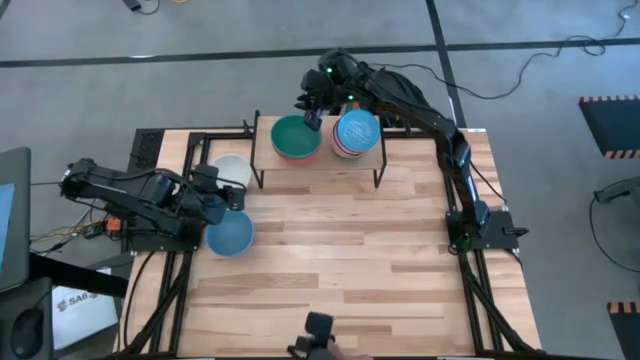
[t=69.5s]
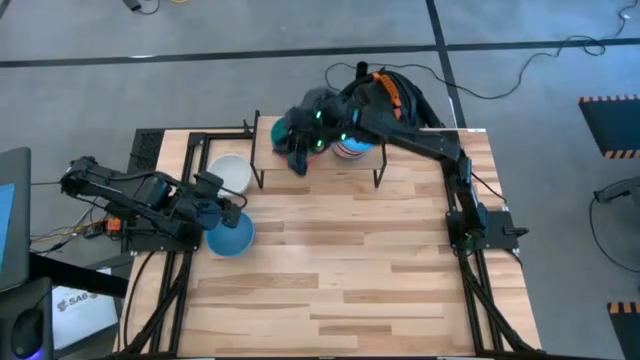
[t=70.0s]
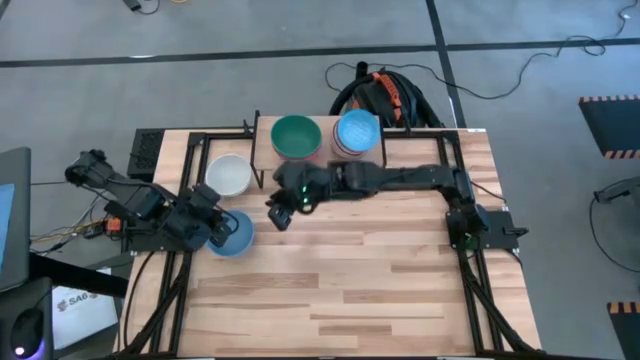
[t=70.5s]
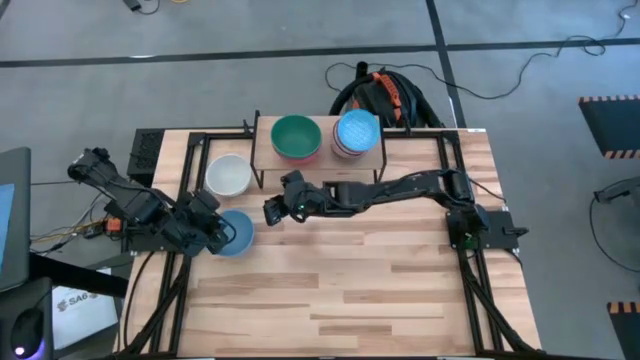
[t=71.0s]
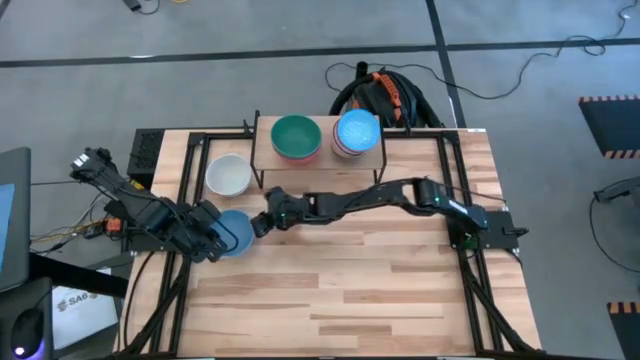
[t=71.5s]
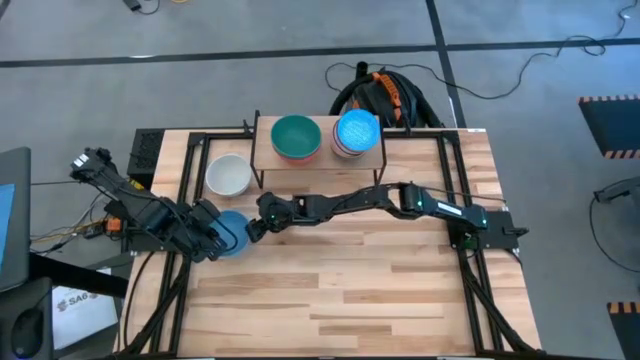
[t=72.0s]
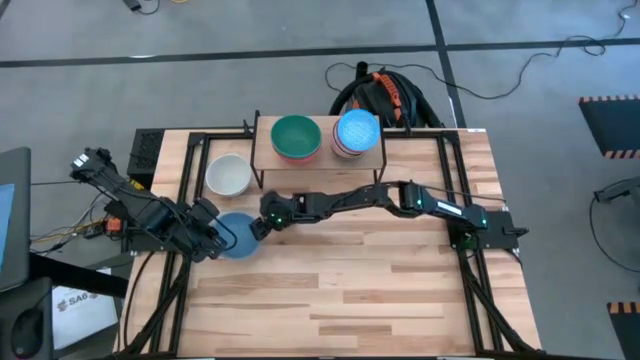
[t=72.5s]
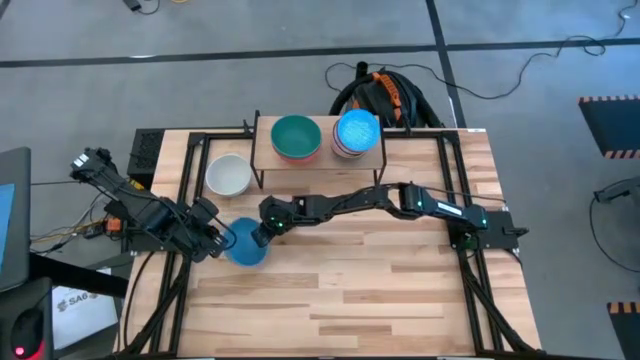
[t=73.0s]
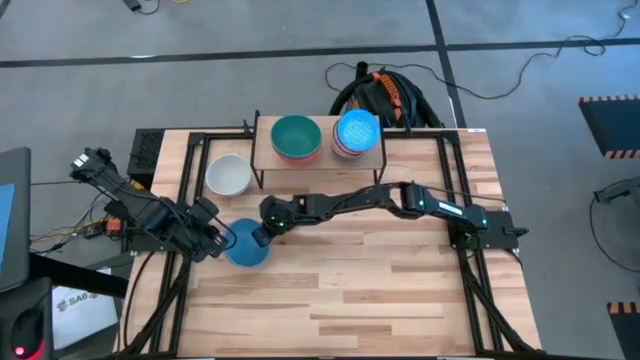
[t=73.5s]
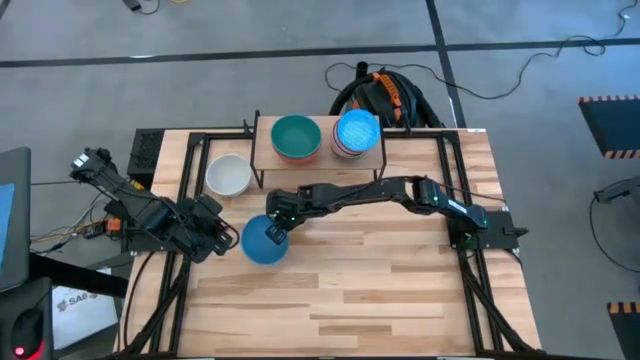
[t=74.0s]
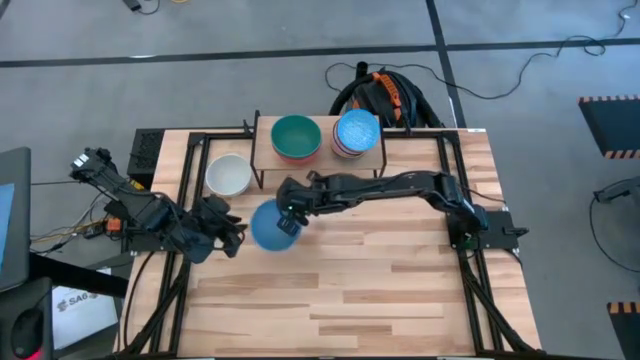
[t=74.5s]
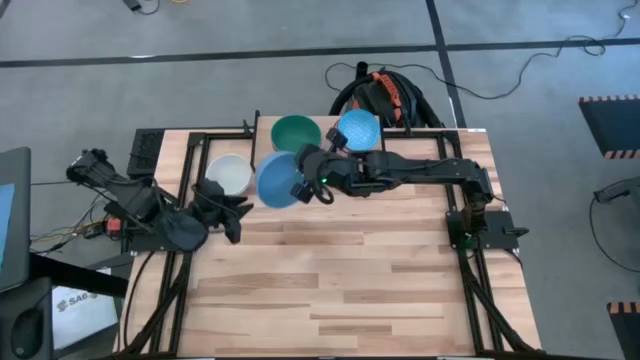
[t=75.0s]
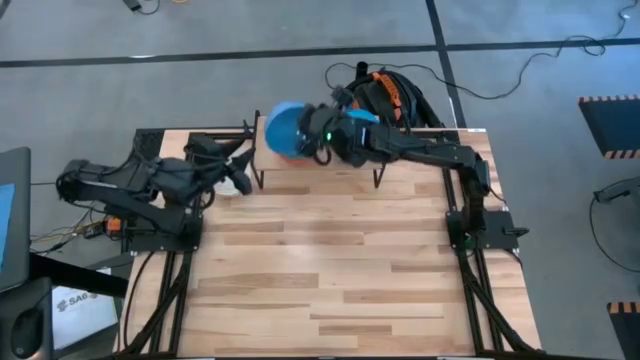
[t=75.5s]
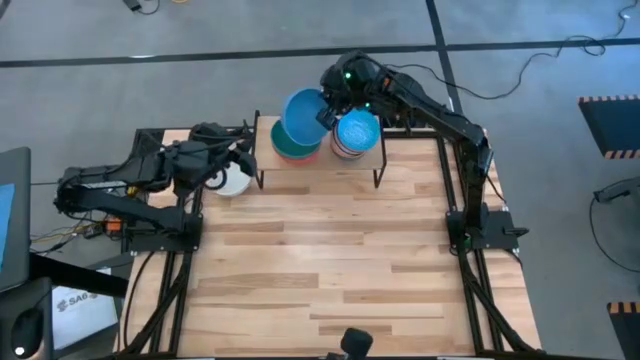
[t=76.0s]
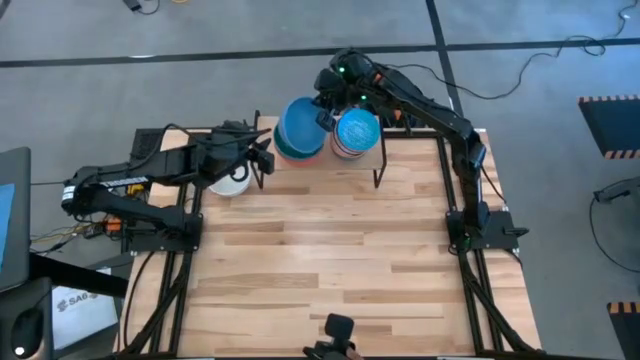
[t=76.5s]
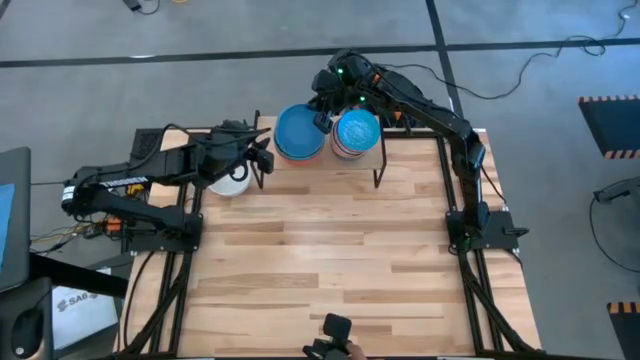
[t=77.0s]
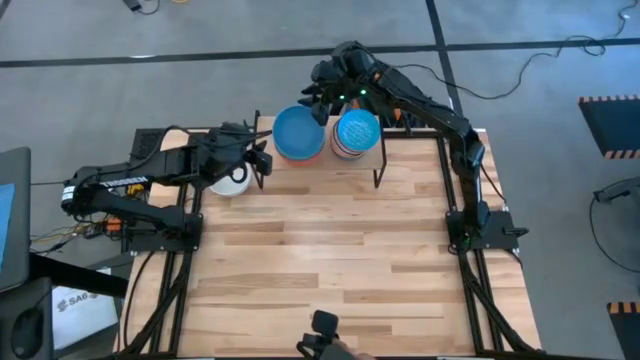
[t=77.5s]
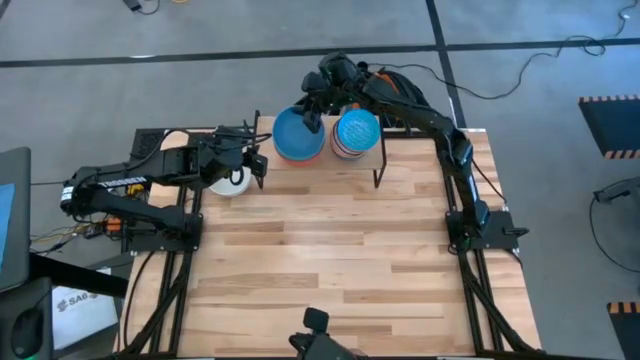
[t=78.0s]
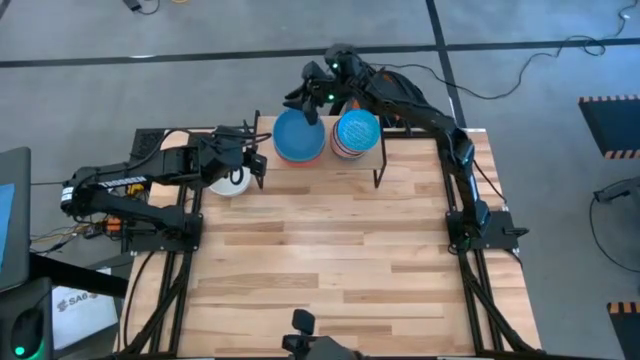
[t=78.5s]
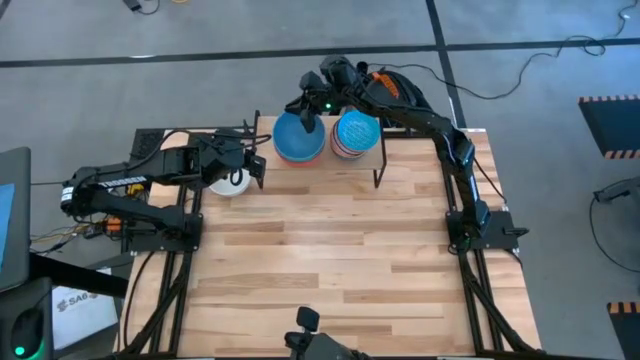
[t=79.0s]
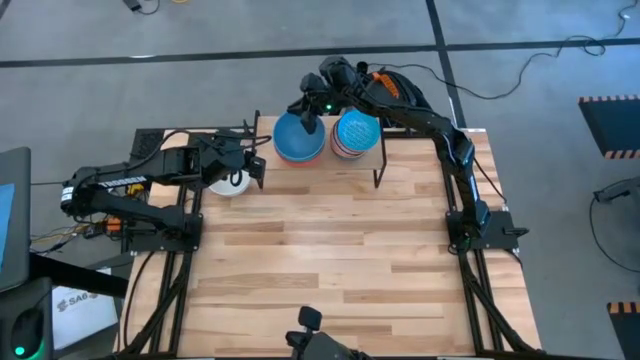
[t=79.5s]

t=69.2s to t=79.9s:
Task: Place and stack bowls onto a shelf
Stack the blue bowl on top of the green bowl on the shelf

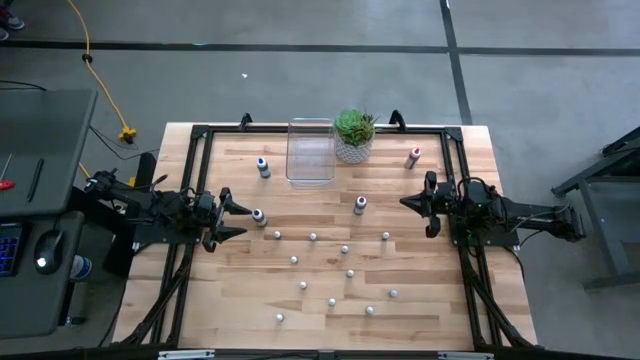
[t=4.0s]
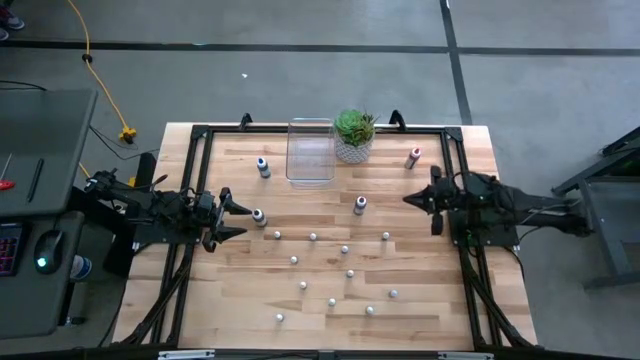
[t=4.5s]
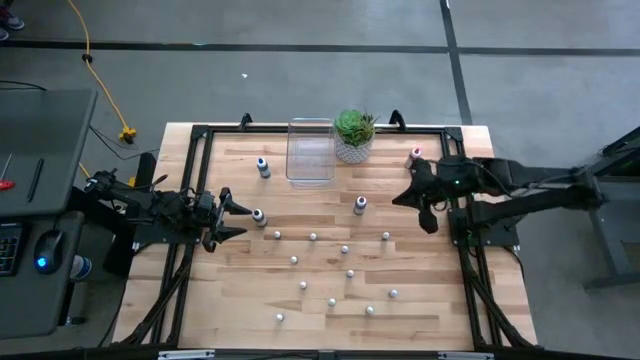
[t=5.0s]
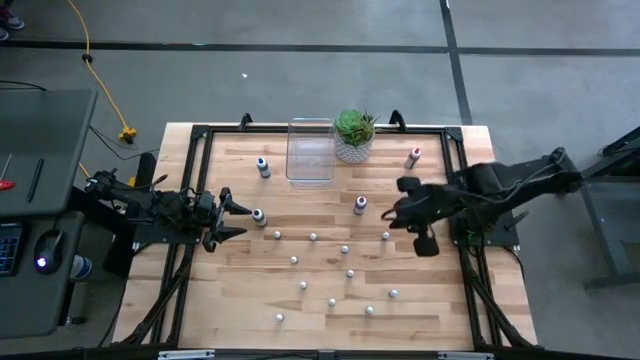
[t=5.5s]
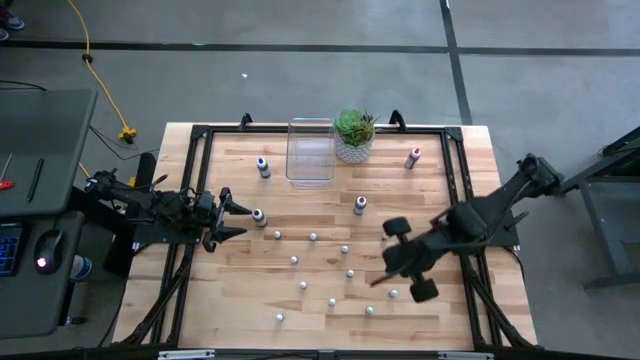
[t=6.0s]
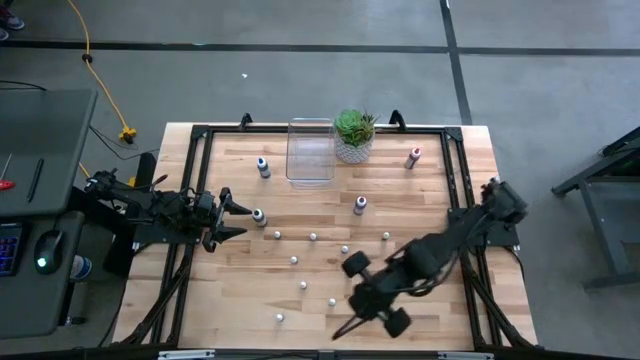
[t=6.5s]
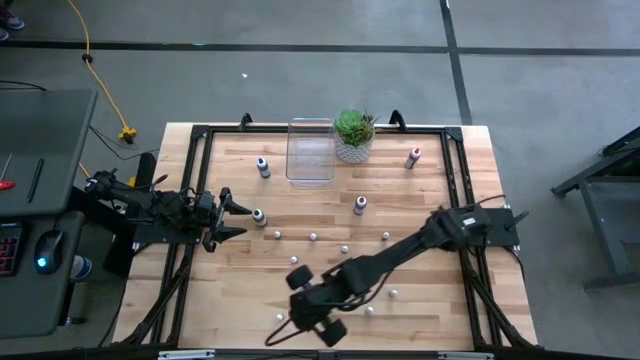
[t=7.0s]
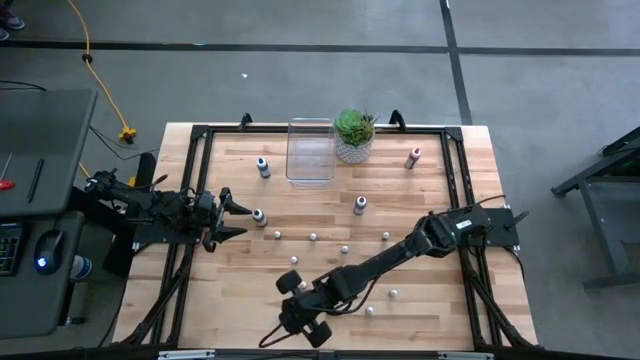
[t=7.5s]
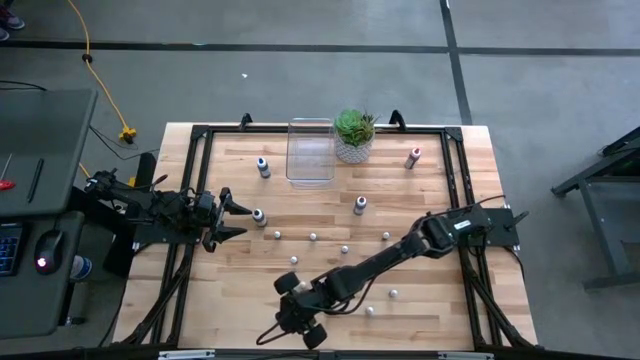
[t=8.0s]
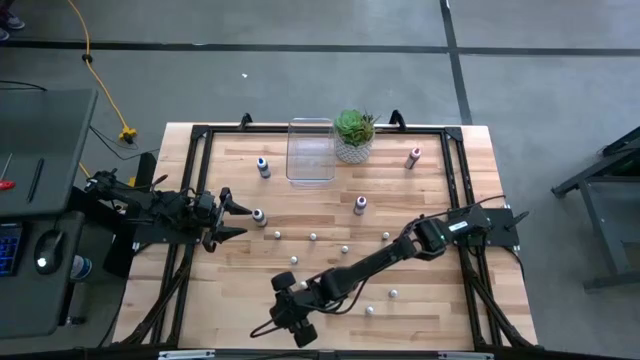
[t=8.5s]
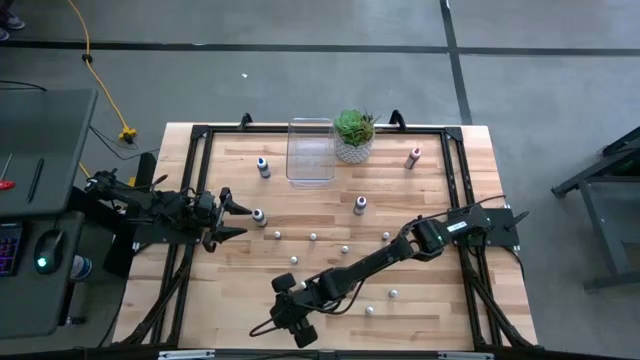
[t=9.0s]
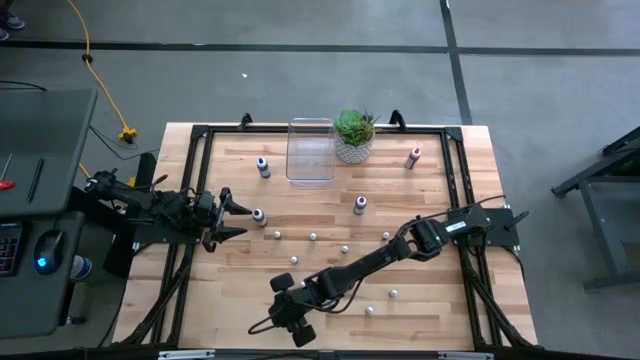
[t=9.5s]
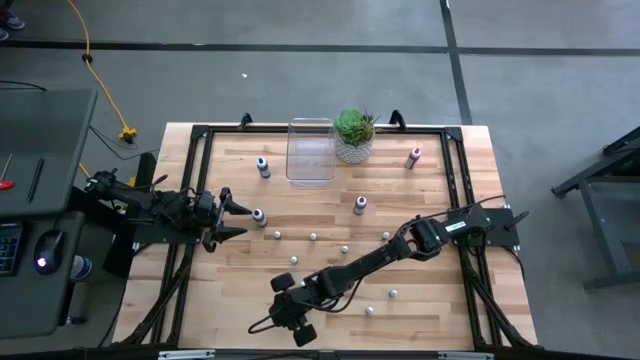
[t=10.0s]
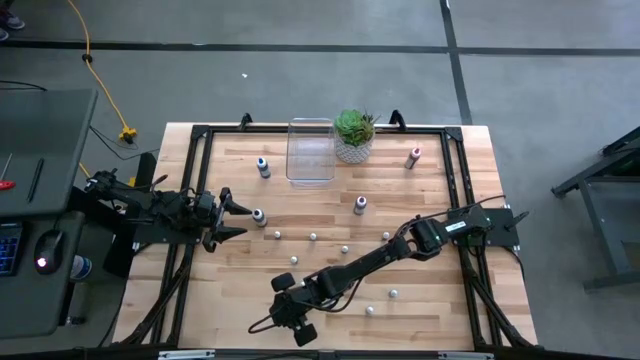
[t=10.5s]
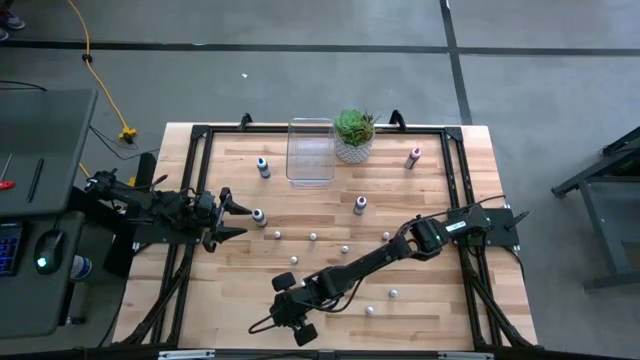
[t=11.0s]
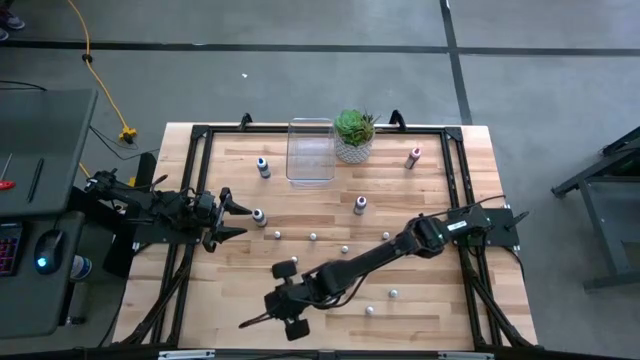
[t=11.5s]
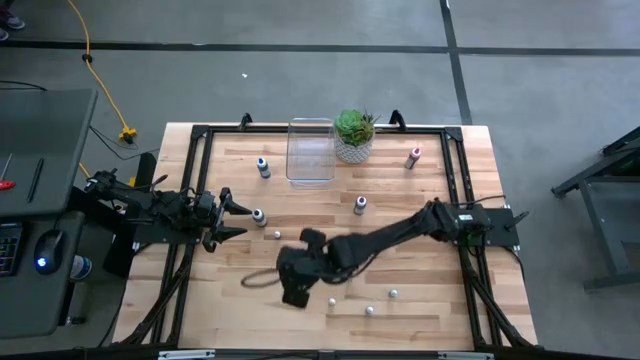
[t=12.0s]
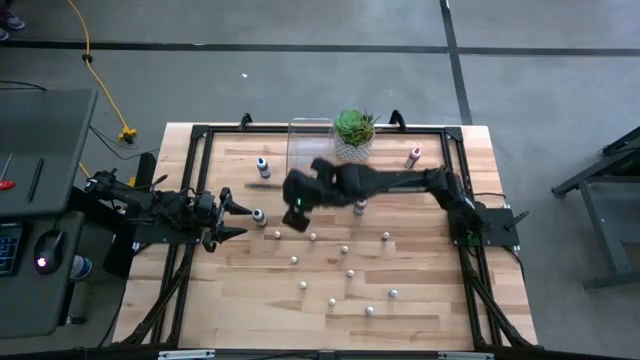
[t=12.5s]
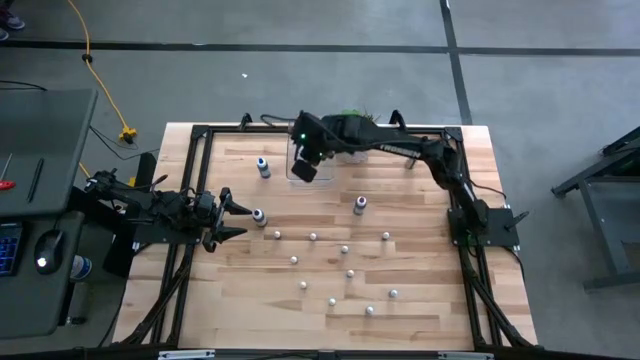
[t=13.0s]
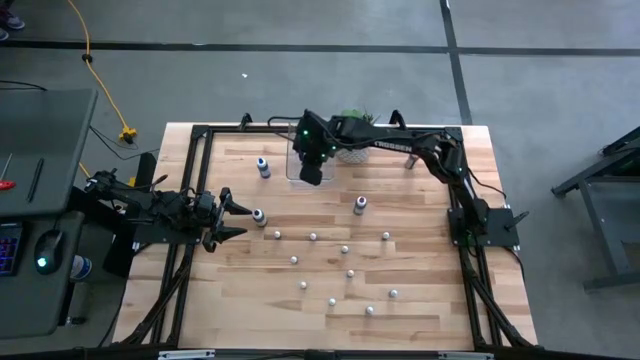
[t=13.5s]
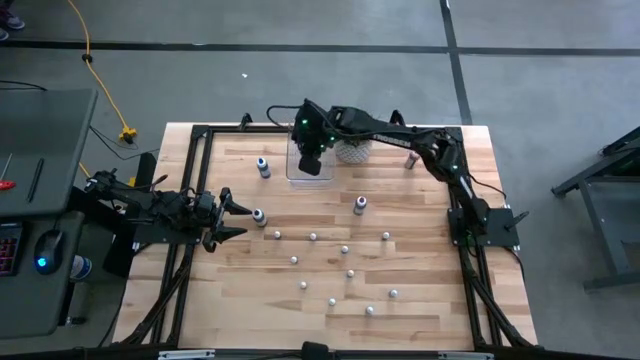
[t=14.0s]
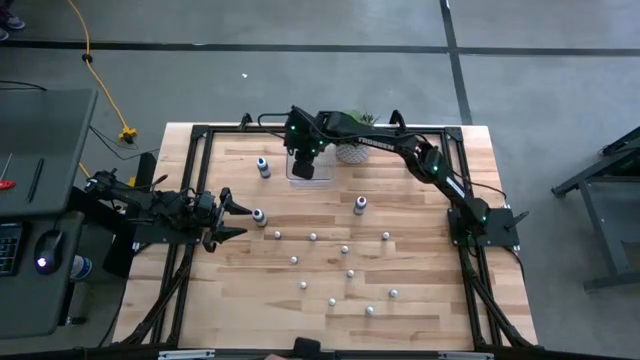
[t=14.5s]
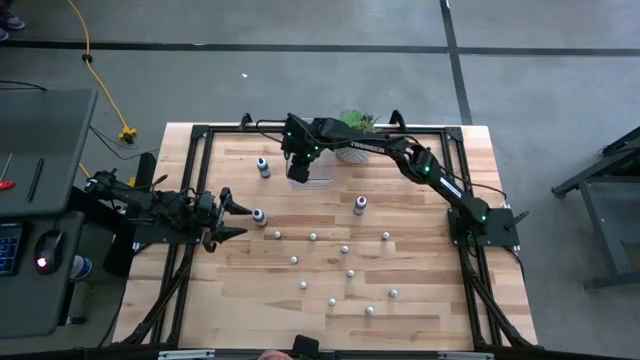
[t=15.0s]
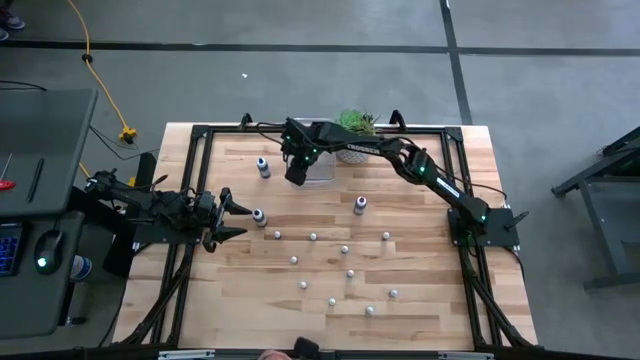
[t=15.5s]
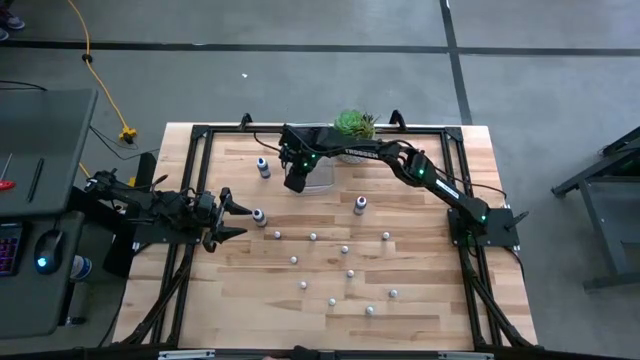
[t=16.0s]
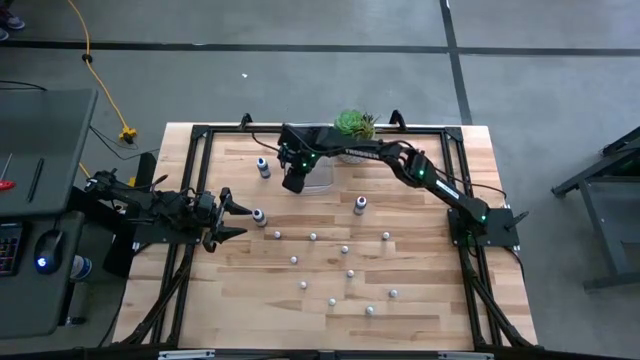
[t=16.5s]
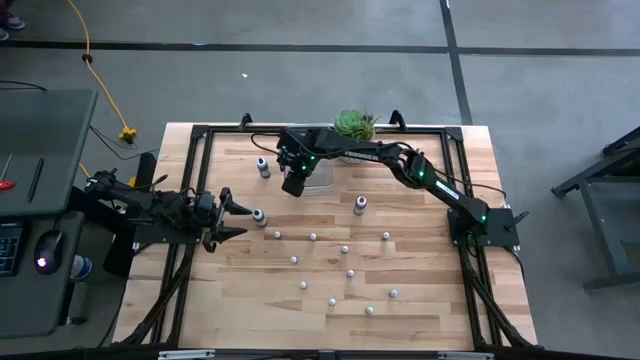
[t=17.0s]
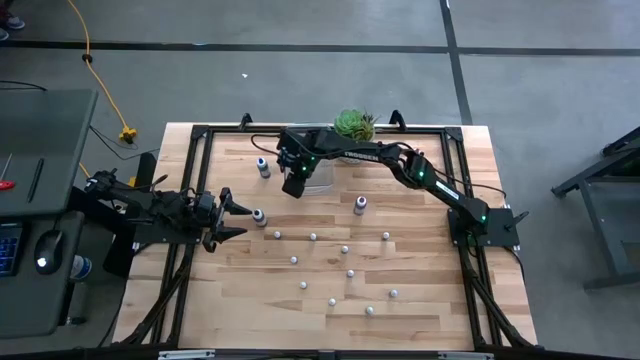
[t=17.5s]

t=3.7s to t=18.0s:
Task: Pick & Place food coloring
Put the small violet food coloring bottle into the transparent bin
